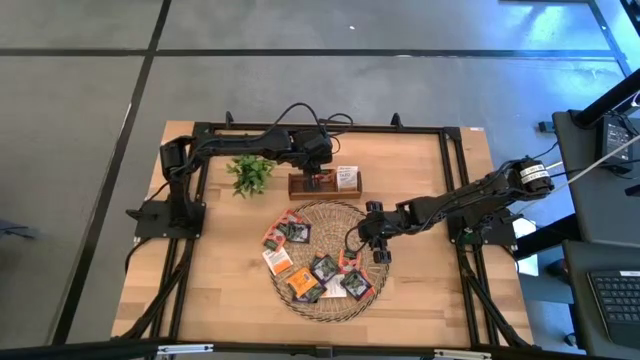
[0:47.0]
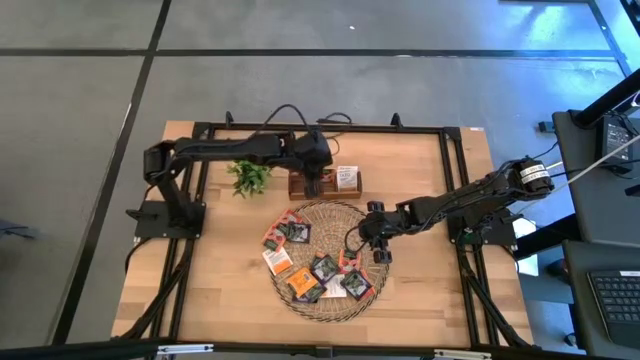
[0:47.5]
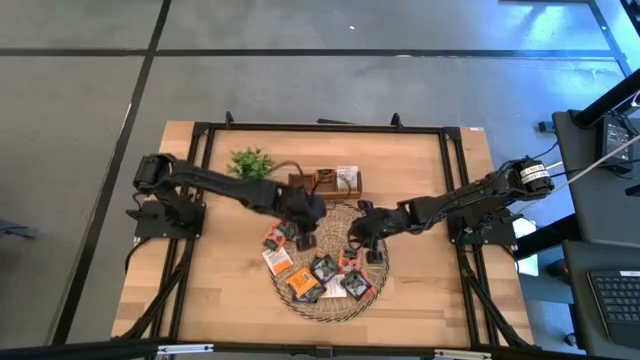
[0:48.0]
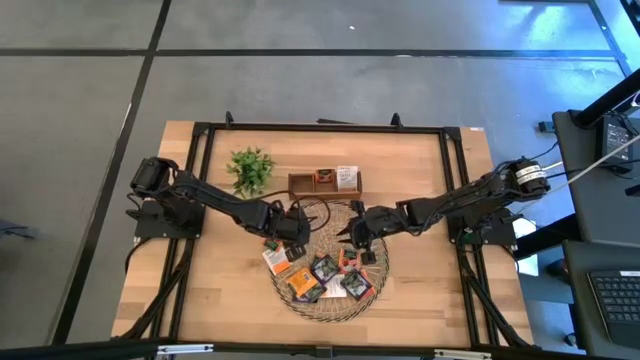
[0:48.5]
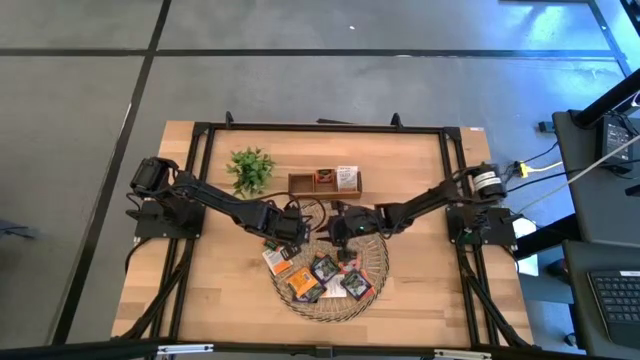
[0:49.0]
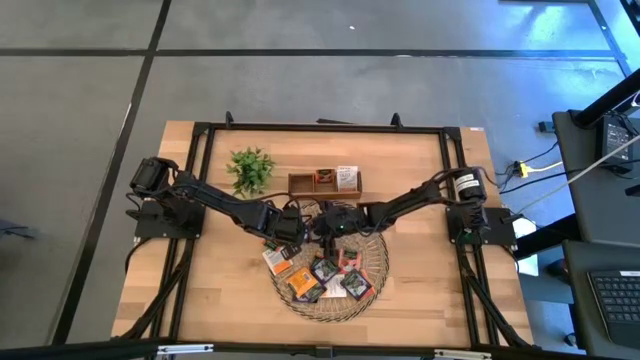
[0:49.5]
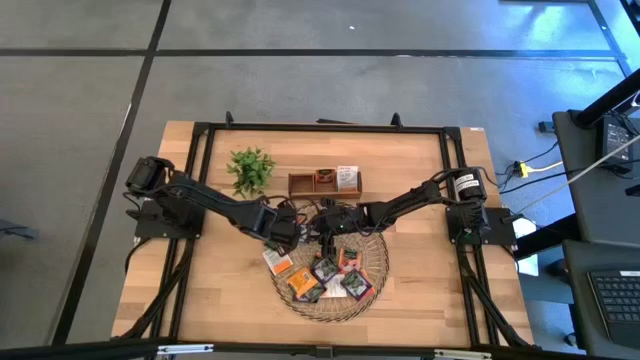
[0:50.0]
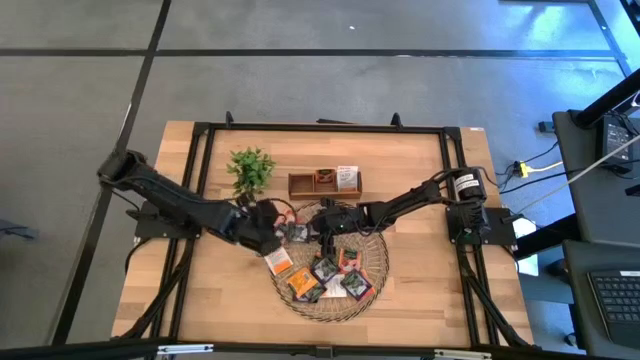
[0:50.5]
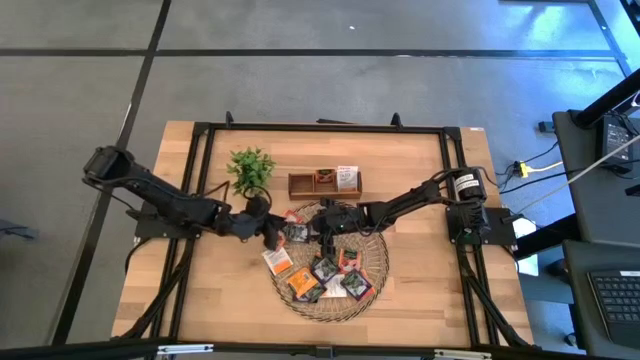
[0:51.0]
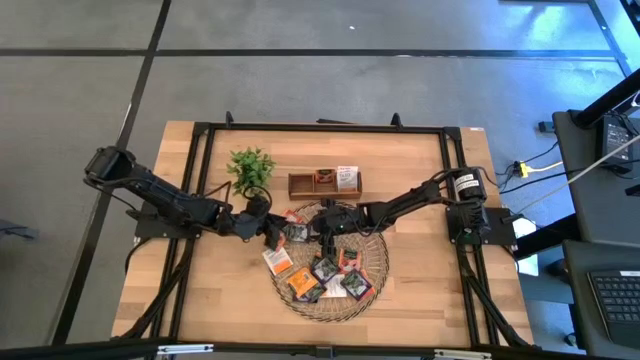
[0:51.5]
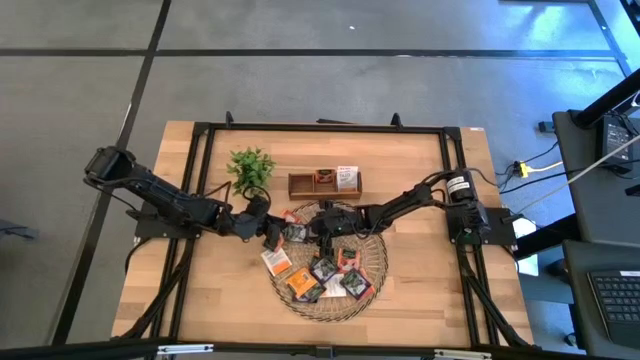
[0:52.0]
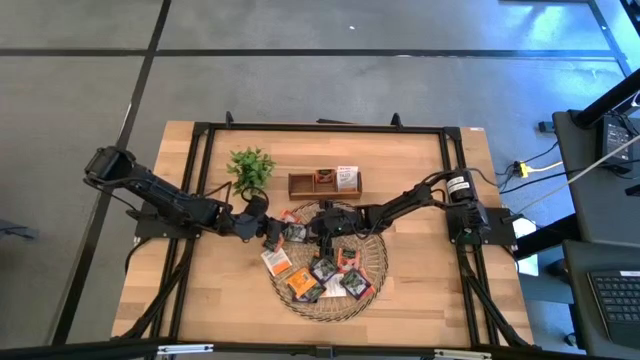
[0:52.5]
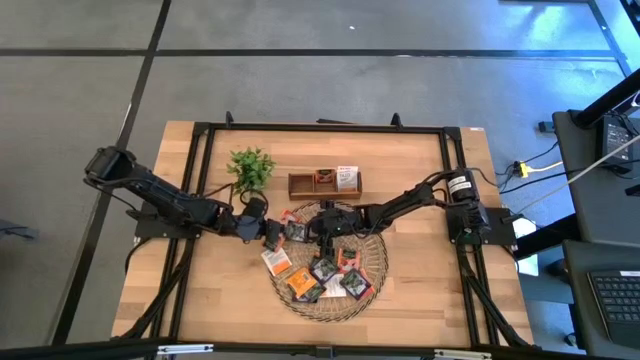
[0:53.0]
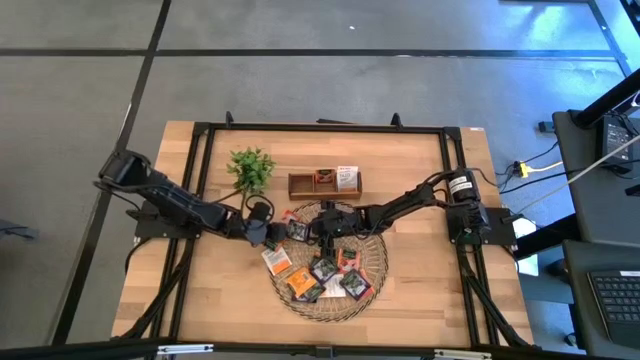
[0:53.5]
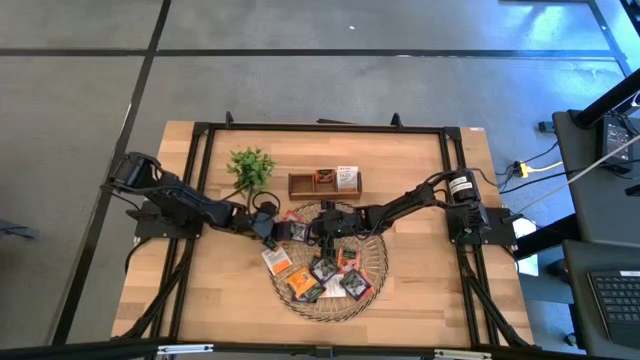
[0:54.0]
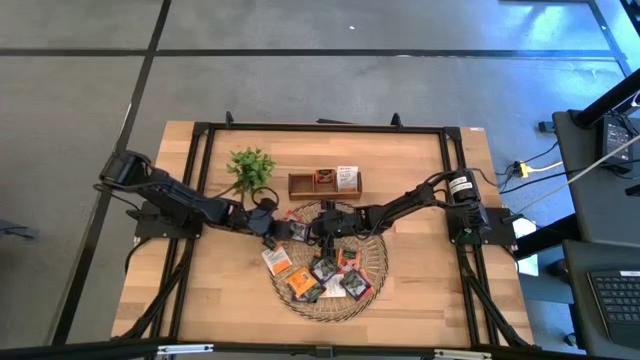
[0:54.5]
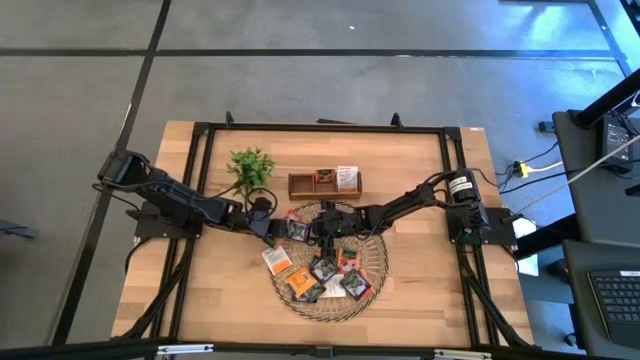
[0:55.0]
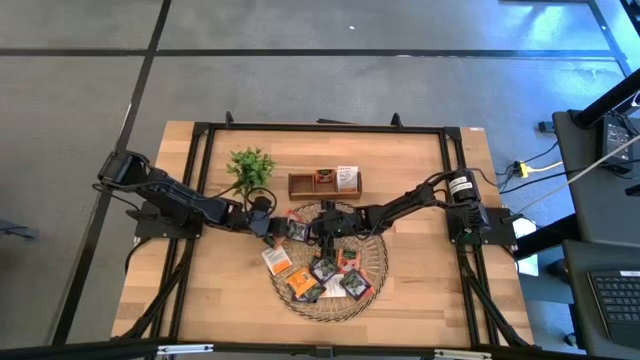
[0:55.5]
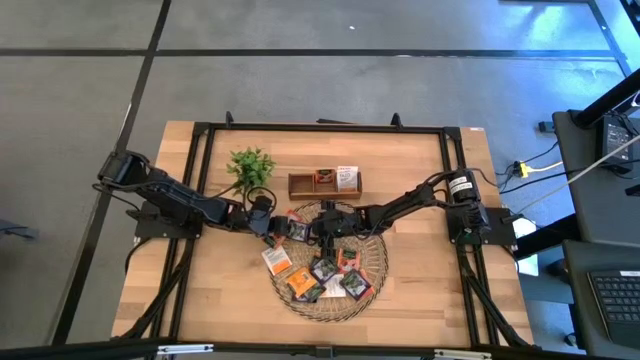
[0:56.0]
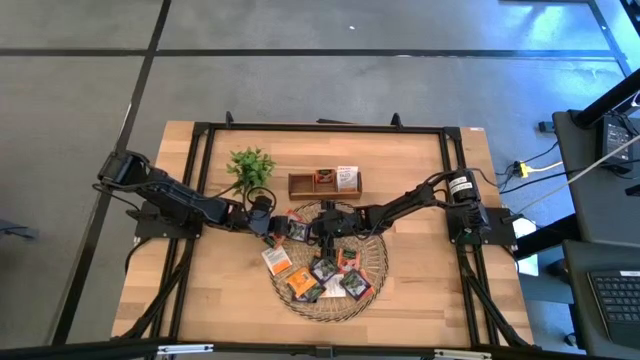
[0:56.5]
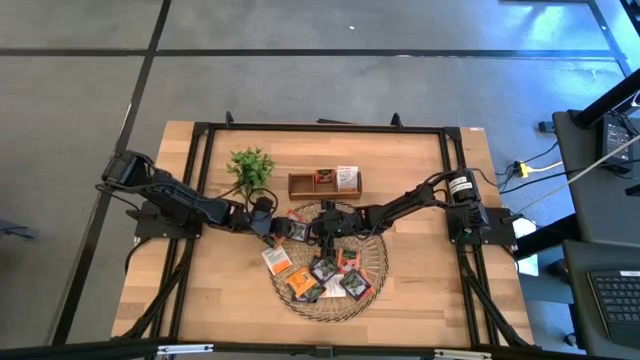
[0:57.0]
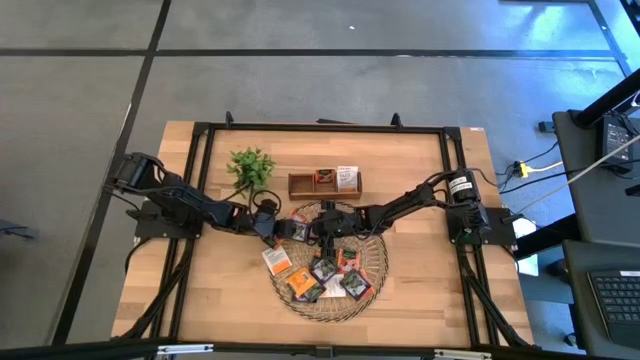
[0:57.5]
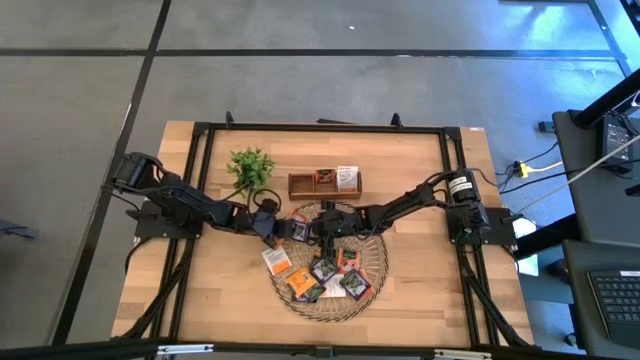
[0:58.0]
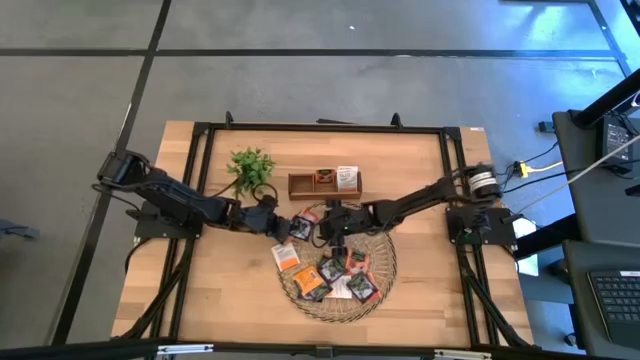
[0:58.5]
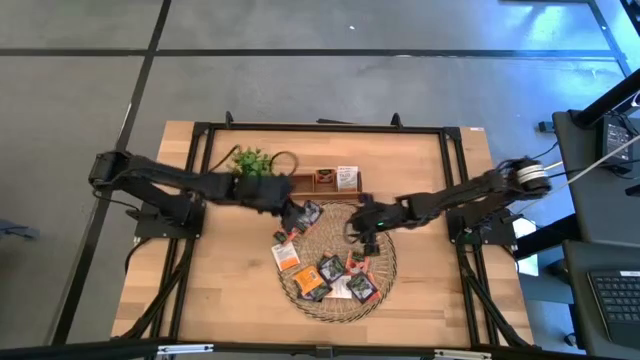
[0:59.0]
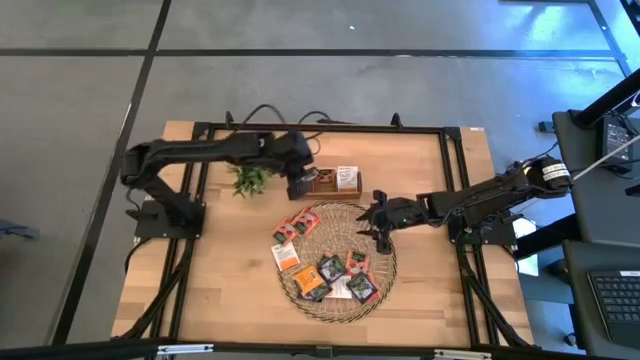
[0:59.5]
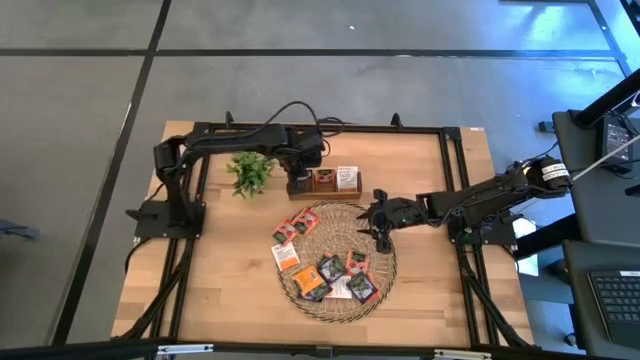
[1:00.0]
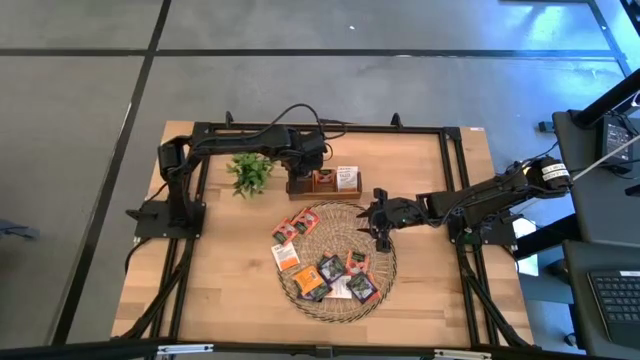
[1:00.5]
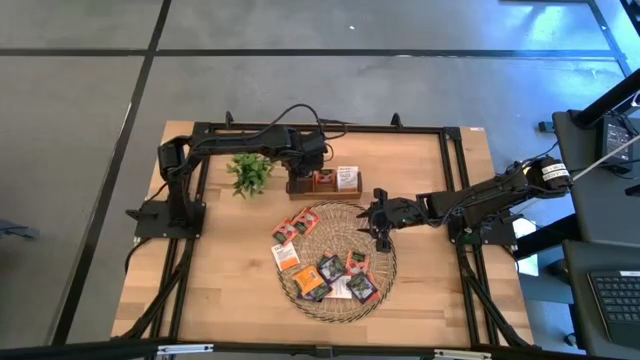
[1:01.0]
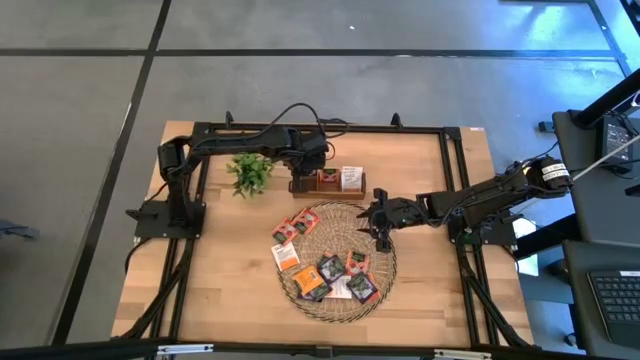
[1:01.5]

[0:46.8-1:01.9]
Task: Pick & Place Tea
Put the black and white tea bag into the left section of the wooden organizer

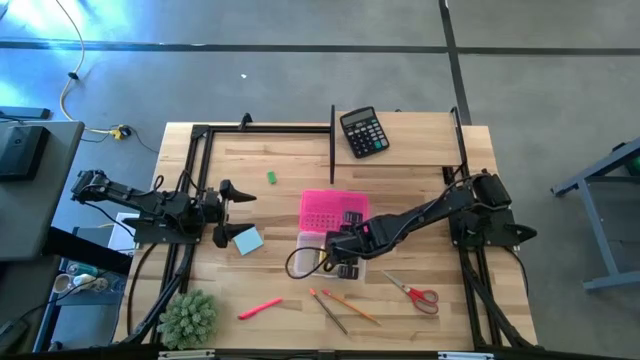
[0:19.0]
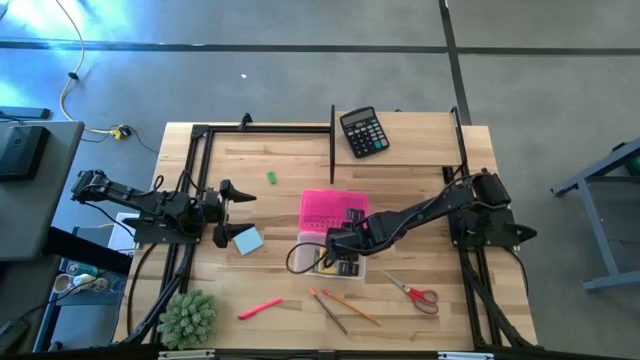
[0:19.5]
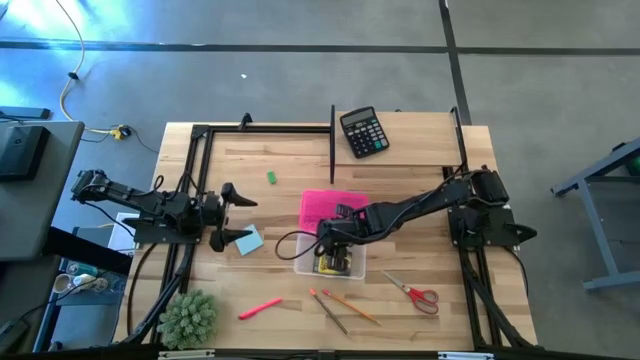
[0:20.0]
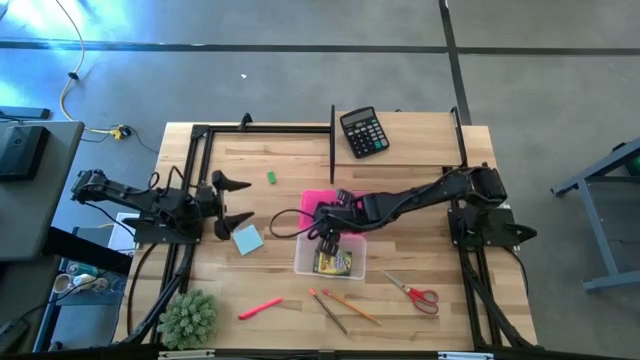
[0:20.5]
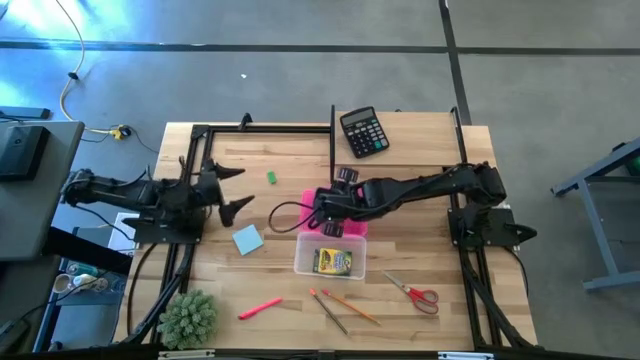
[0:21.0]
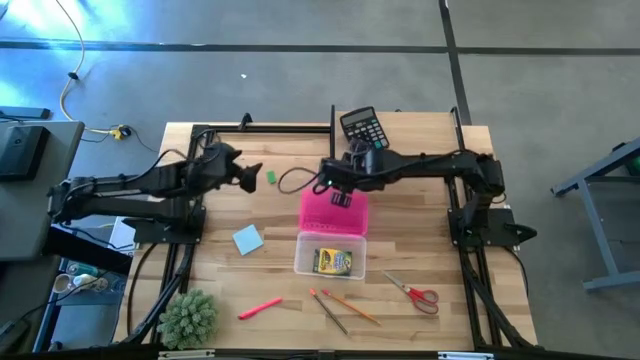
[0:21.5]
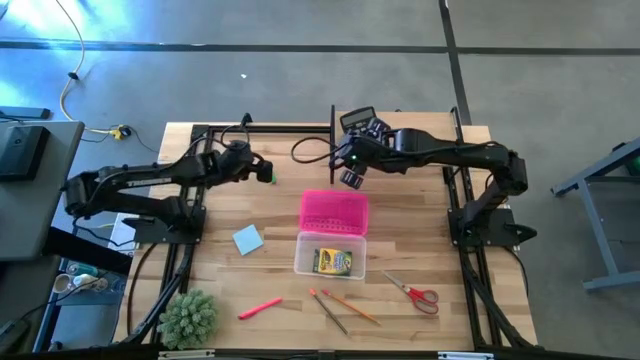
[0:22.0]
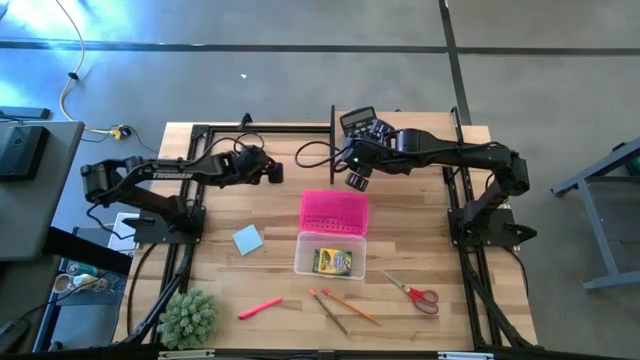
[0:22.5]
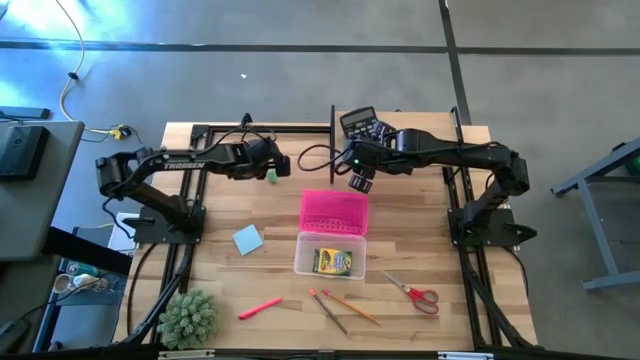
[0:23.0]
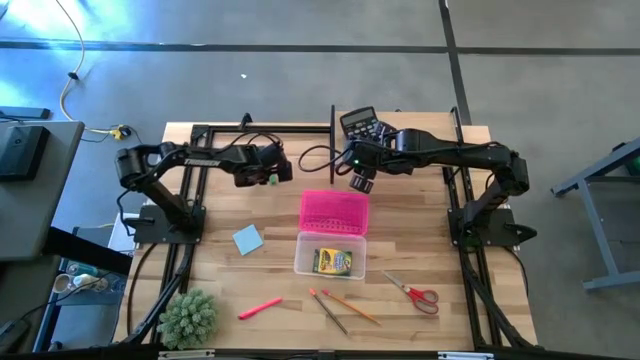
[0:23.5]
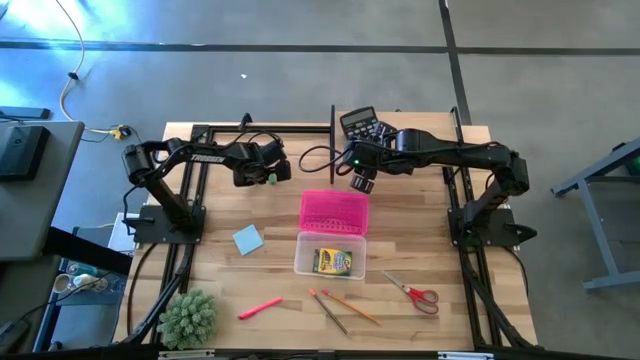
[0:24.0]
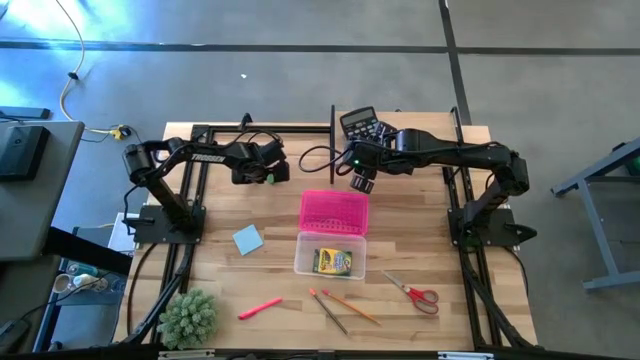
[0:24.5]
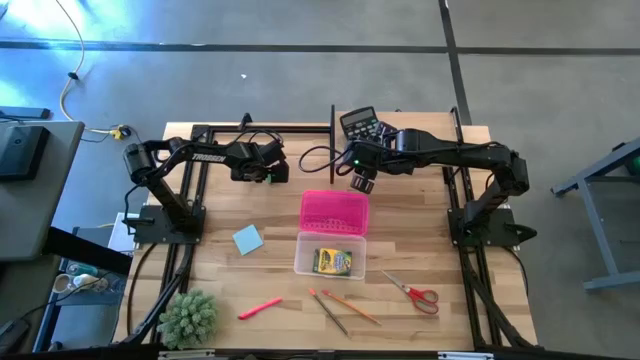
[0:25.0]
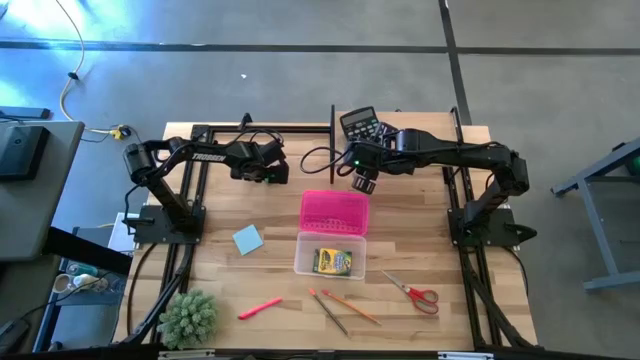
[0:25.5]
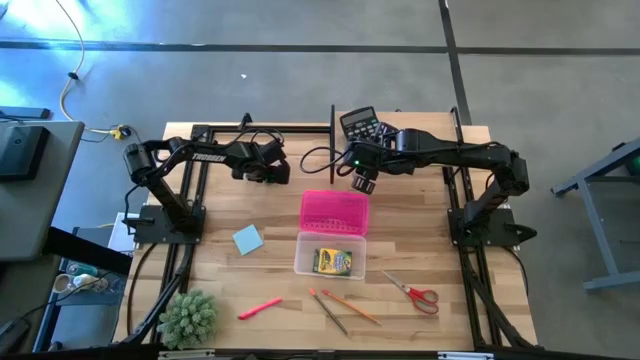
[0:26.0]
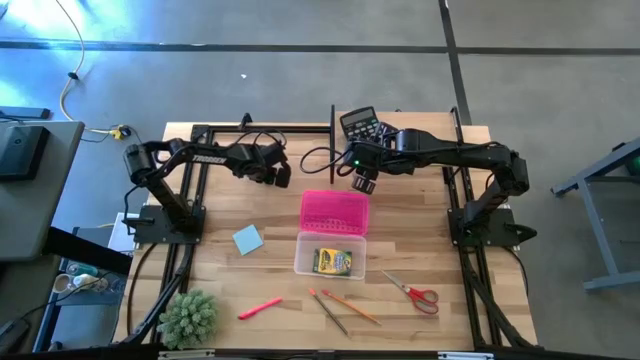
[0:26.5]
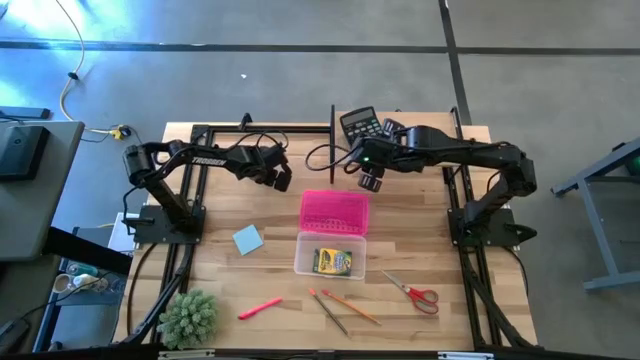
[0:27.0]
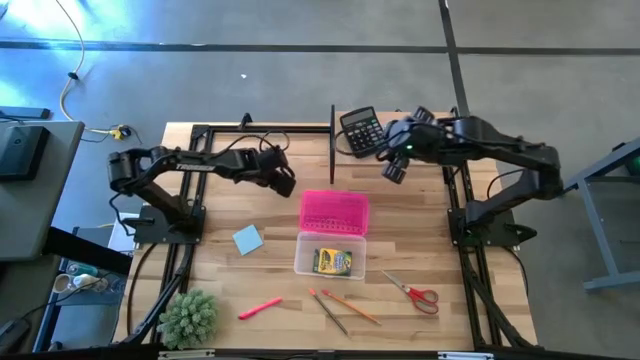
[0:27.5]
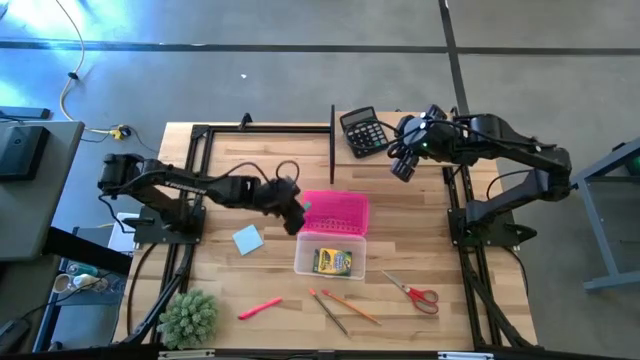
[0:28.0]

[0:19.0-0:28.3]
Task: Pack school essentials
Put the green eraser into the pink supply box
